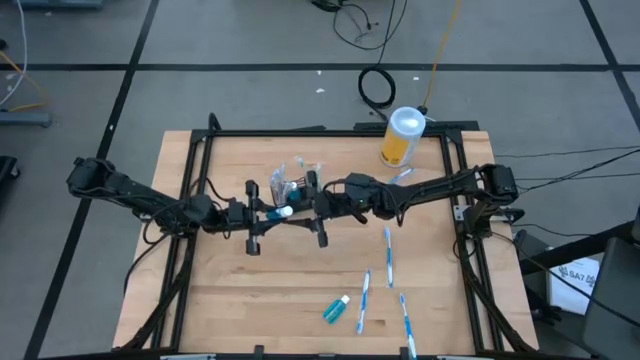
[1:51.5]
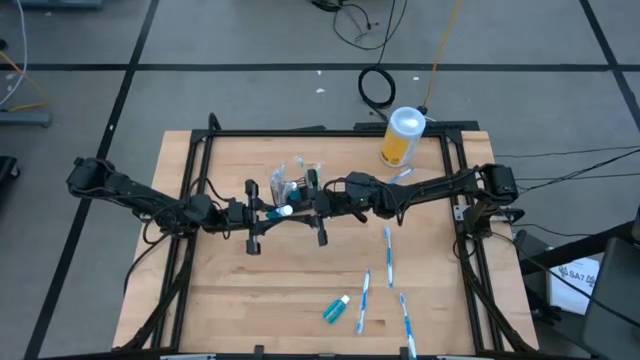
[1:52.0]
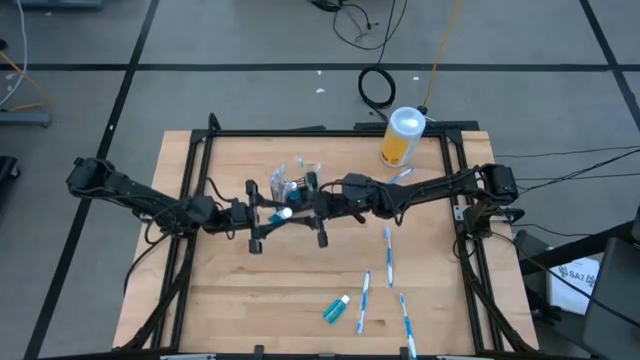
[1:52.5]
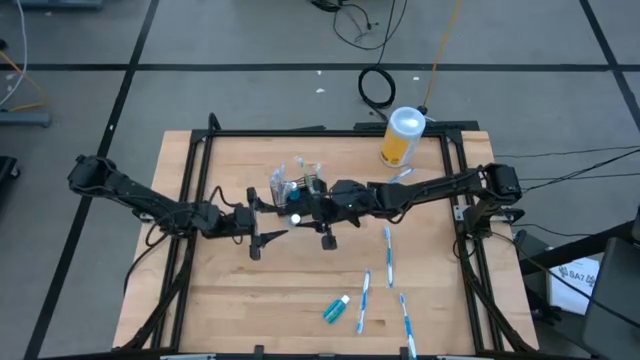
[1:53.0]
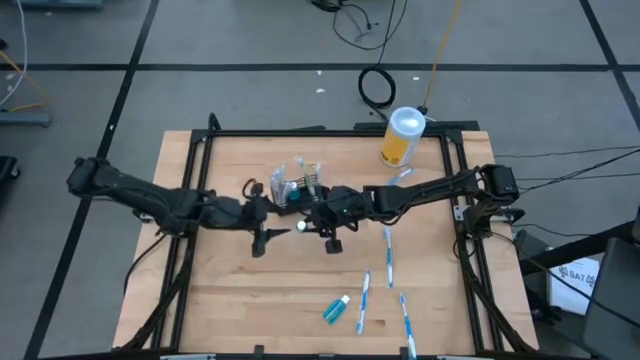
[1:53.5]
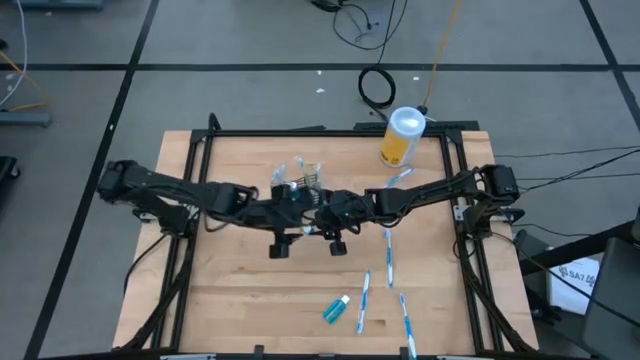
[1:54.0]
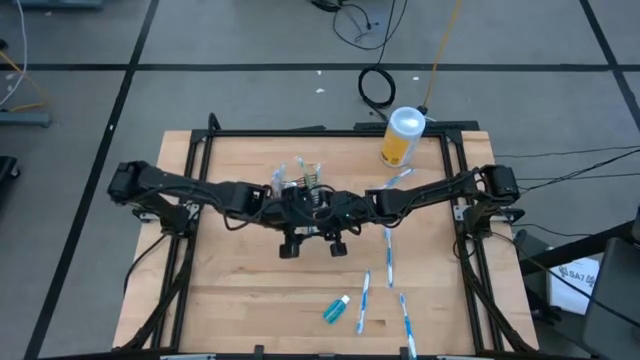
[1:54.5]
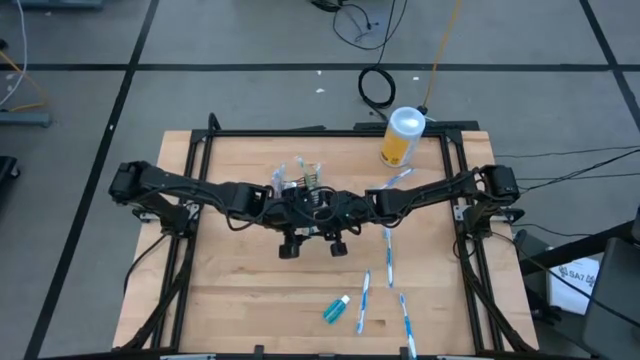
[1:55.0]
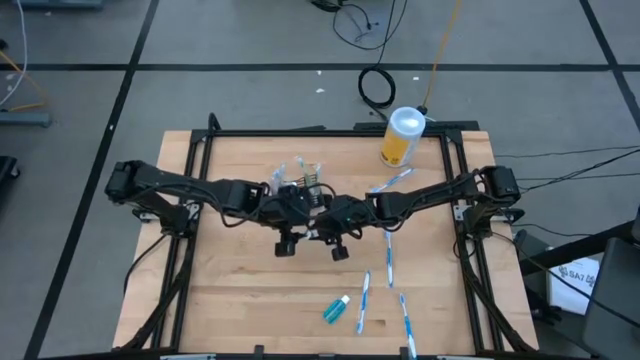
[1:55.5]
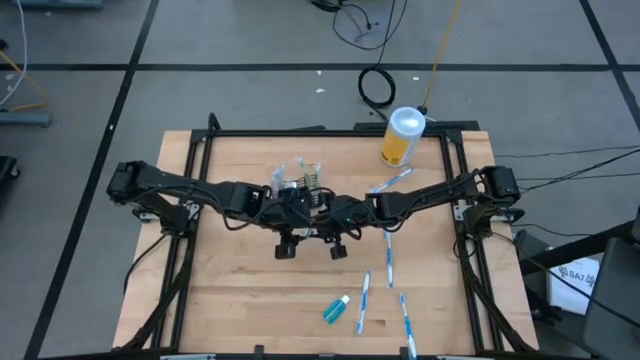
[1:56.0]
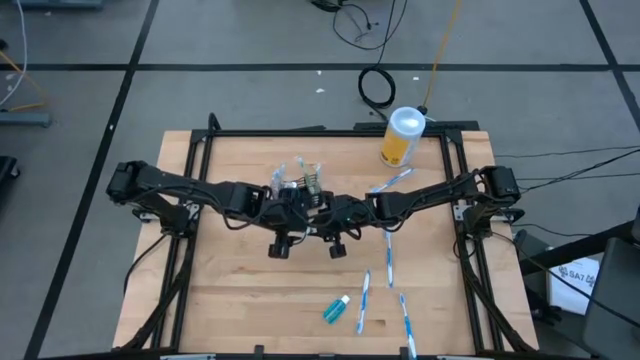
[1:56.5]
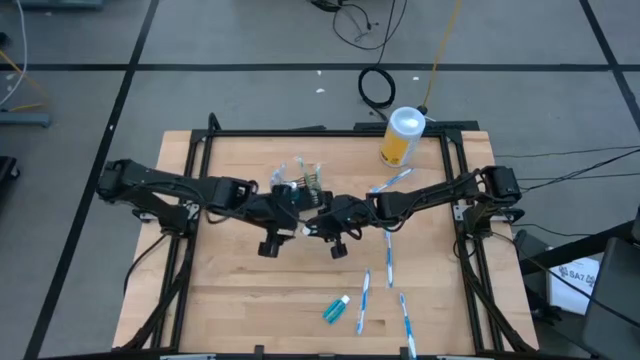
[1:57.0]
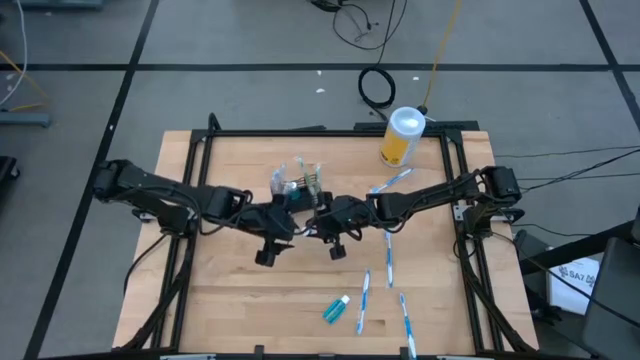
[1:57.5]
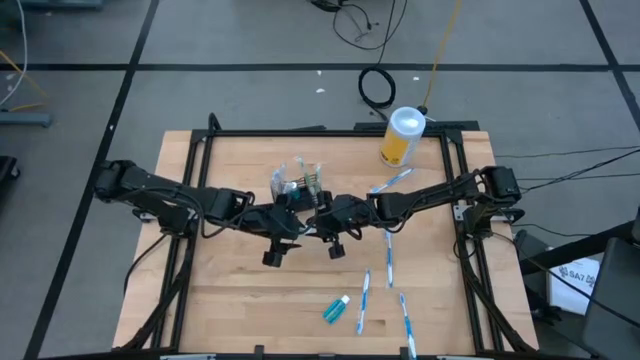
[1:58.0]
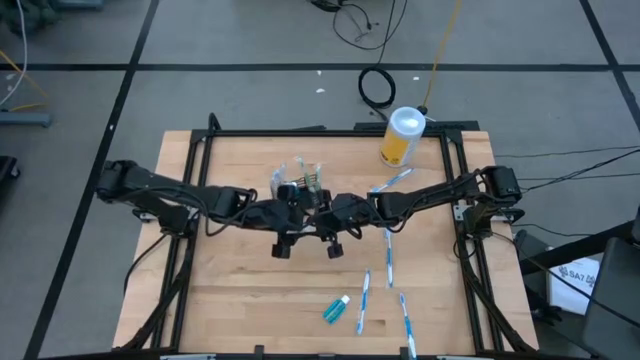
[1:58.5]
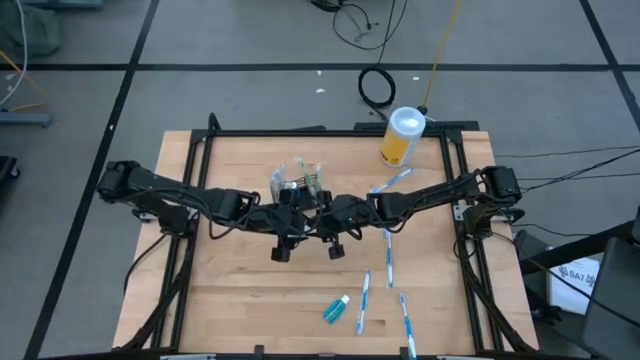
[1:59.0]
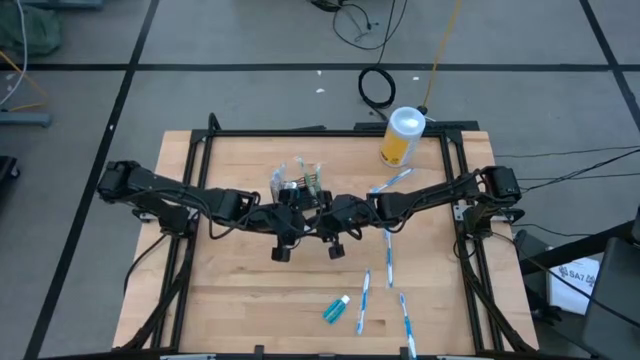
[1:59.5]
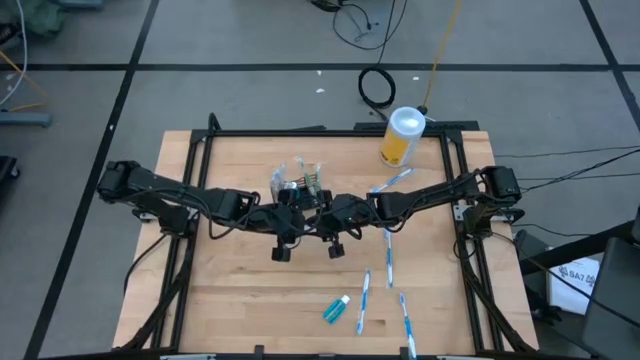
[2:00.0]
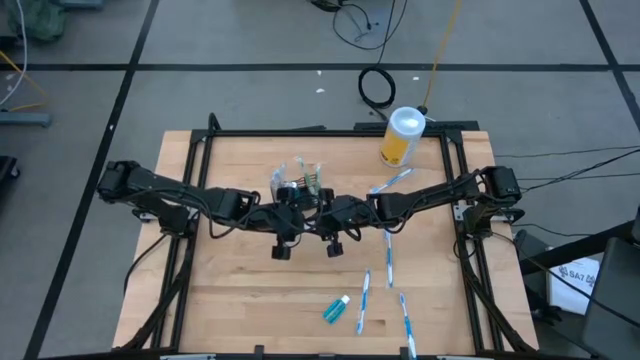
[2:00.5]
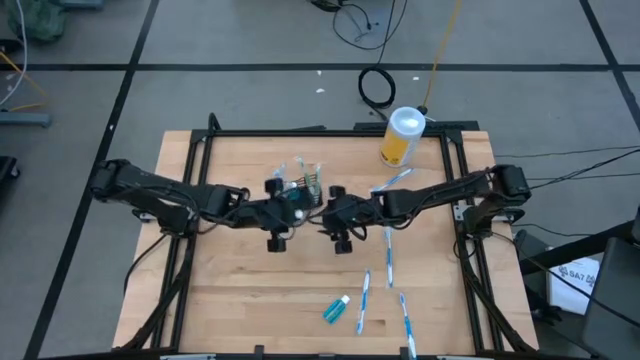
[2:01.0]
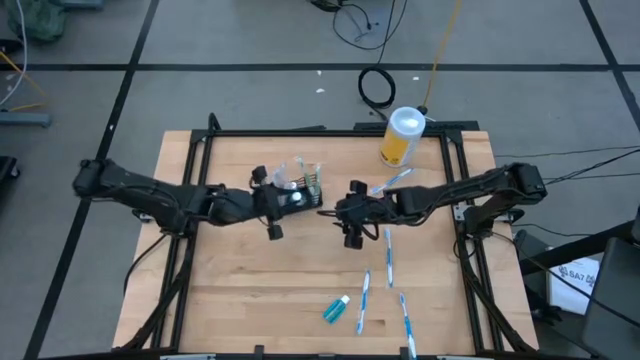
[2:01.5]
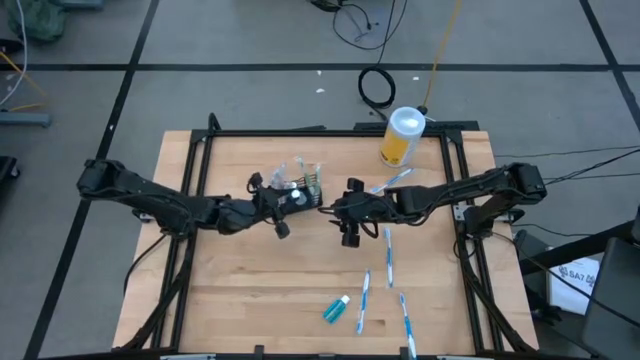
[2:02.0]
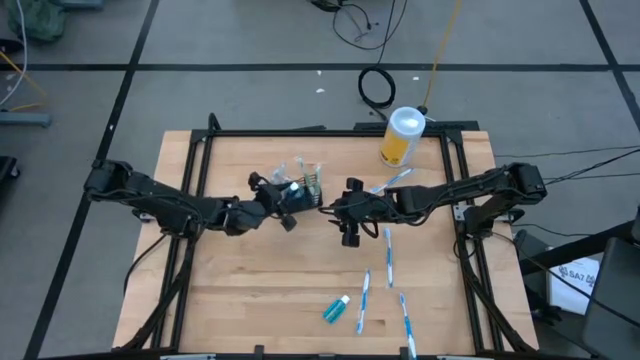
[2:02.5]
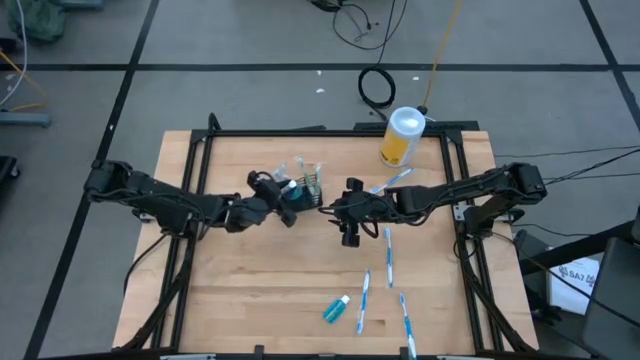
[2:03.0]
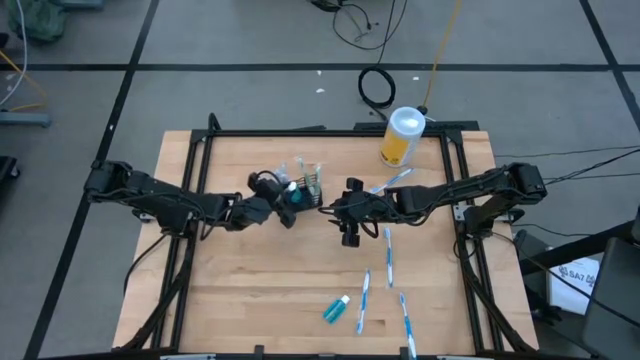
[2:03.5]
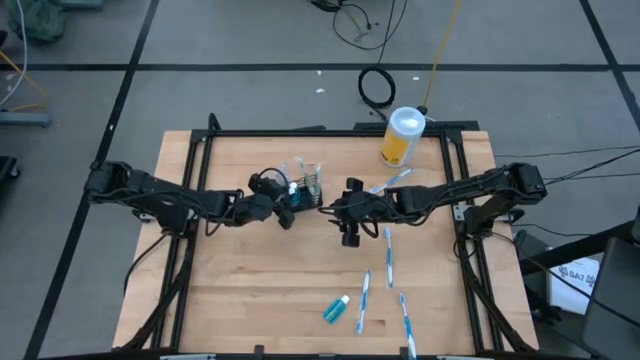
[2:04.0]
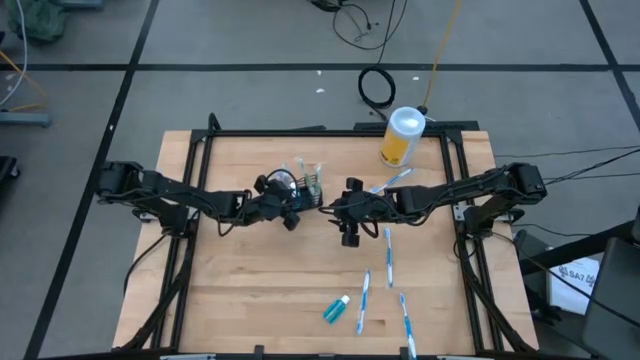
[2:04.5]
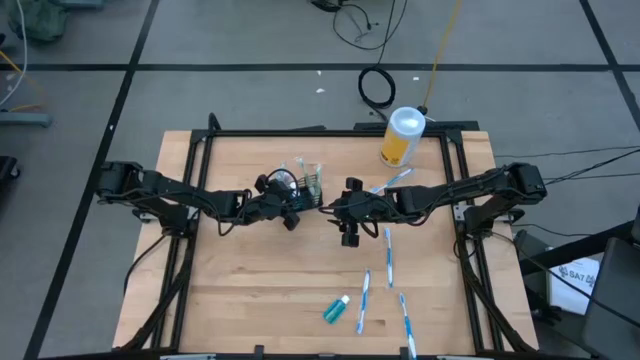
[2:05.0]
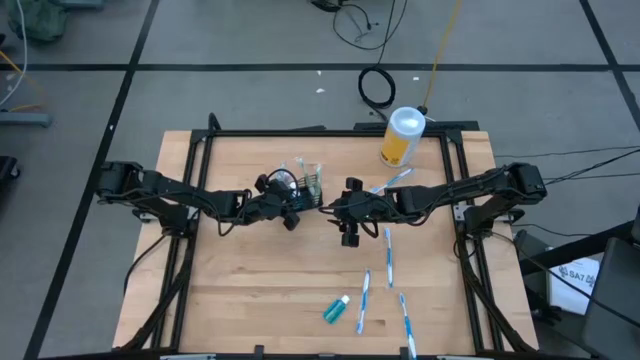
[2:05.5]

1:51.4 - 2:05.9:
Task: Pick & Place toothbrushing station
Put the the top blue mouthwash into the black mesh organizer

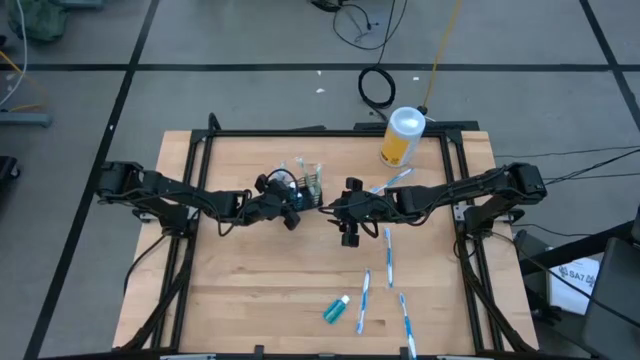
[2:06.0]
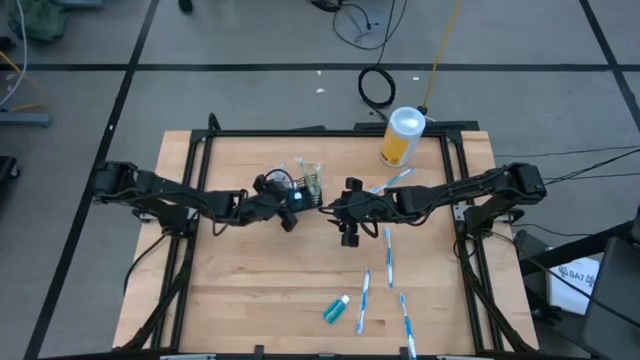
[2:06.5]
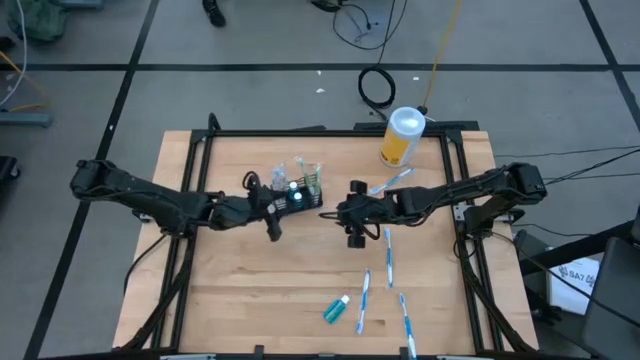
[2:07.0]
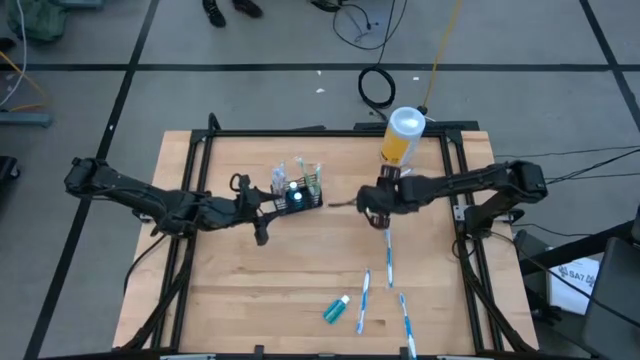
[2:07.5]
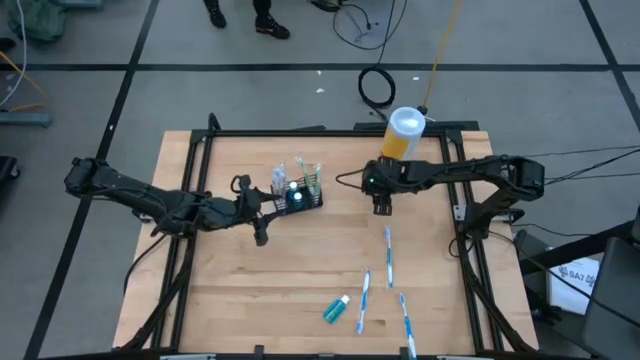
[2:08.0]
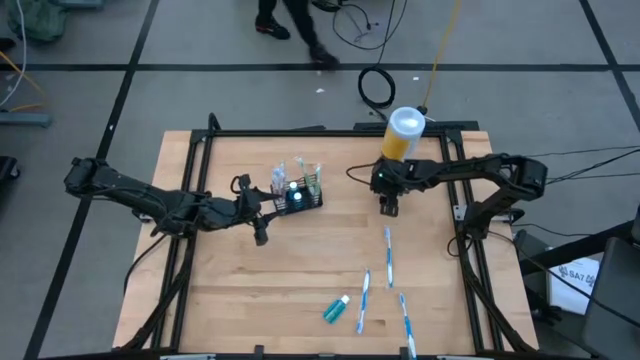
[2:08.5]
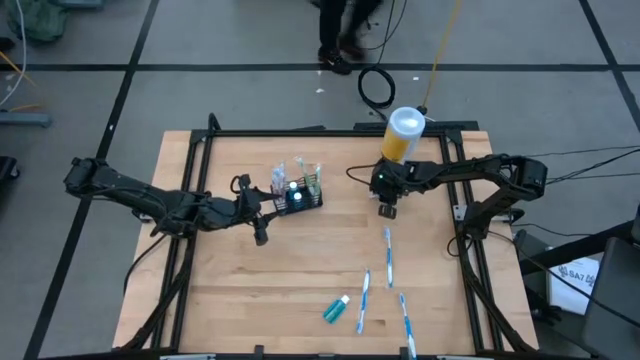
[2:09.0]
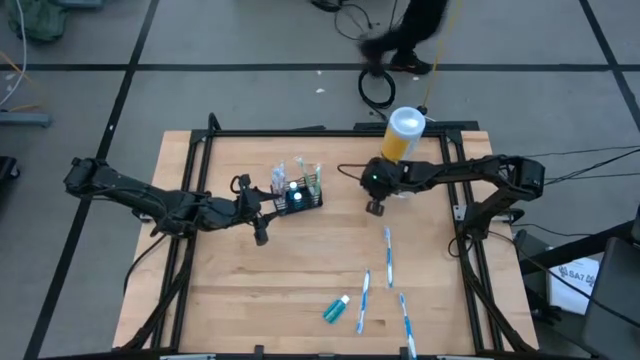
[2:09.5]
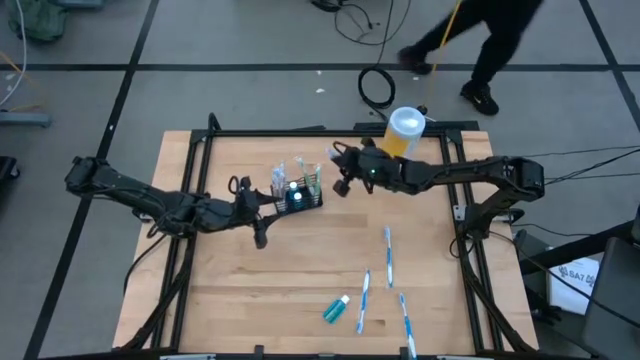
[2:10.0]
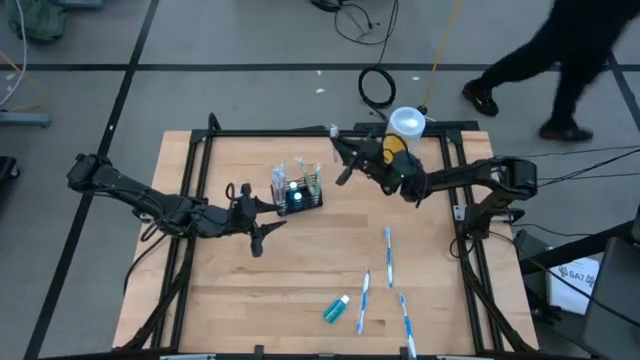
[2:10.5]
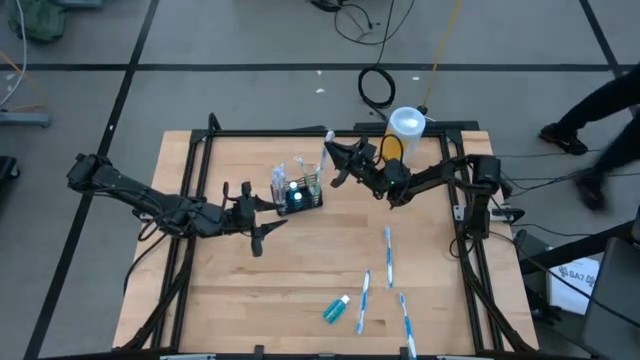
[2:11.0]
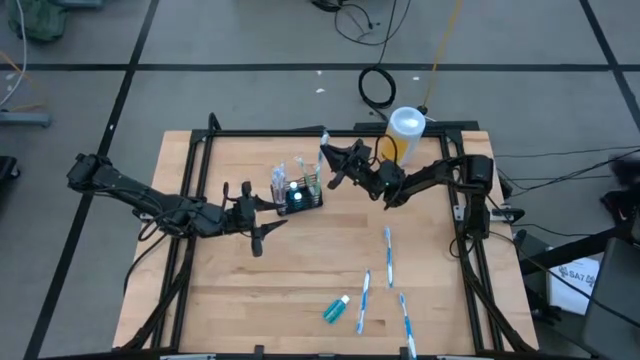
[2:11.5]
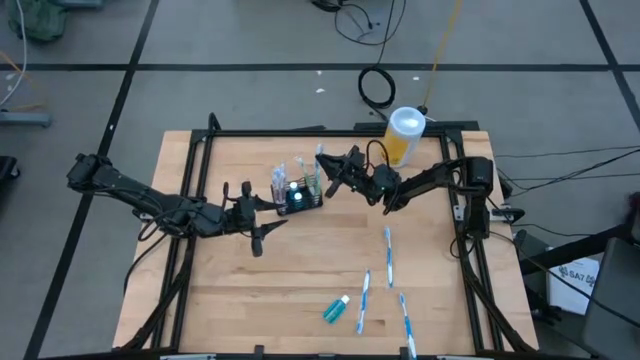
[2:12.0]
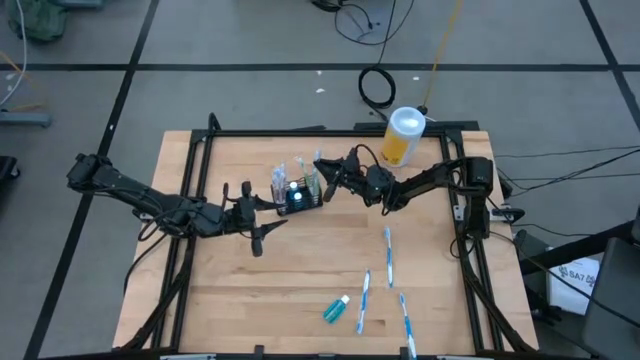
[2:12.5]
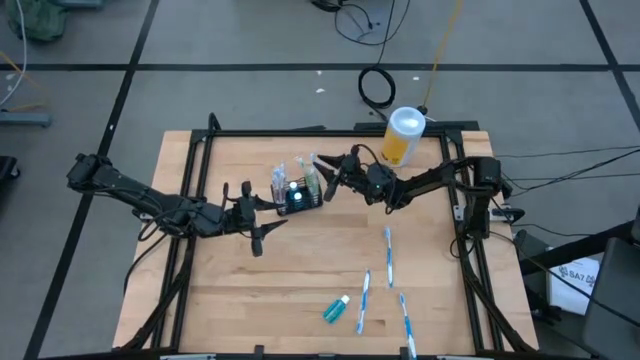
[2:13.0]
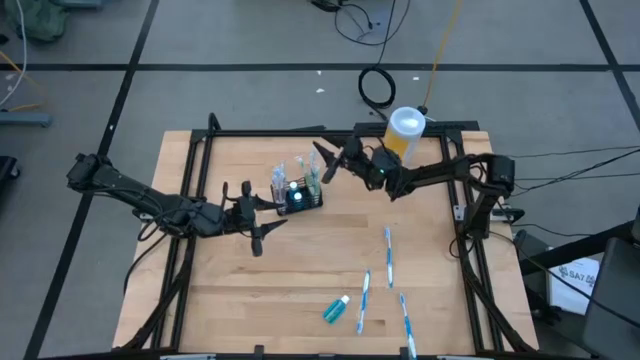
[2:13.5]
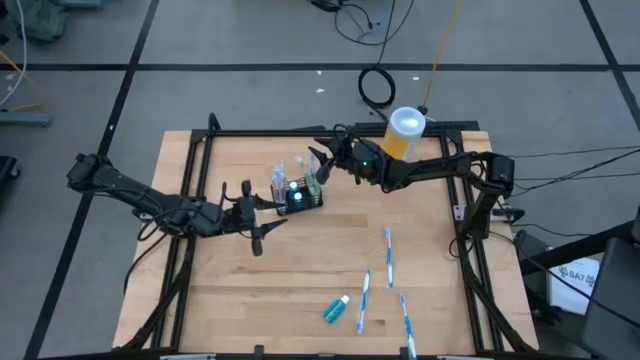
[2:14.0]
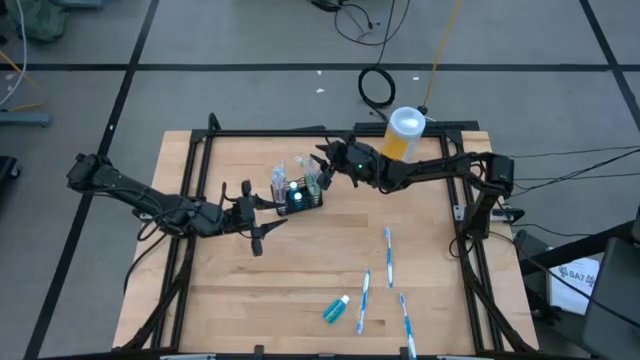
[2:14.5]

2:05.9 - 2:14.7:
Put the blue toothbrush into the black mesh organizer
